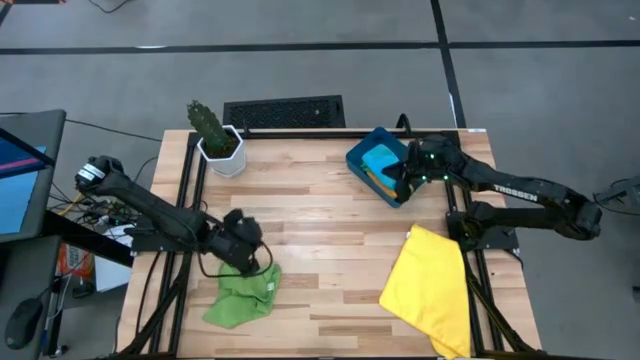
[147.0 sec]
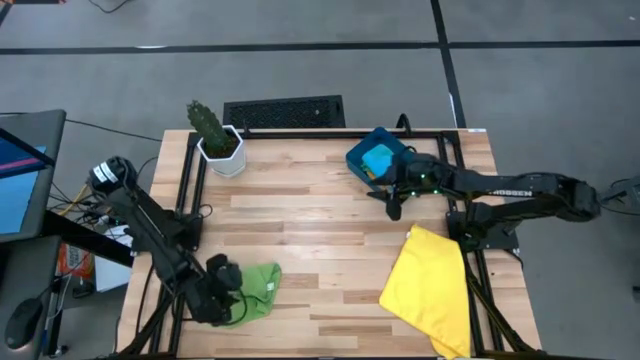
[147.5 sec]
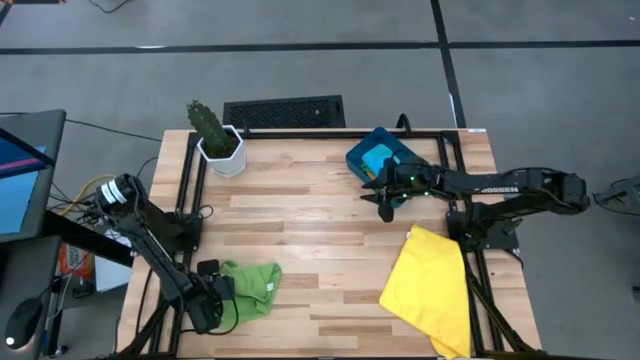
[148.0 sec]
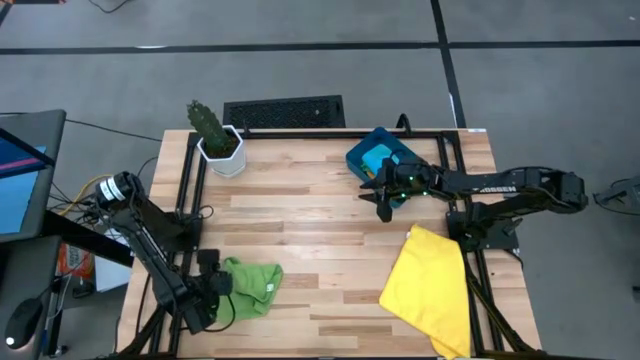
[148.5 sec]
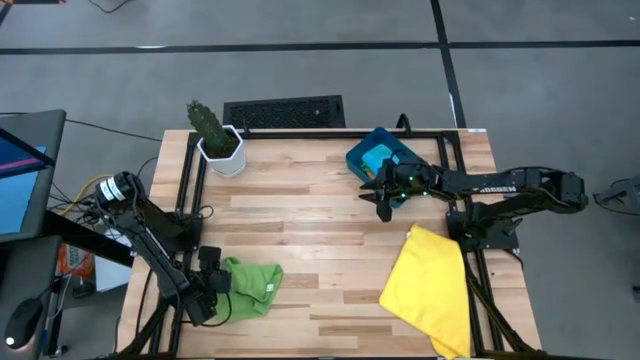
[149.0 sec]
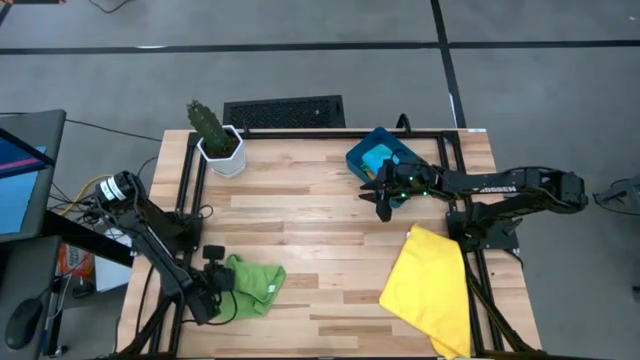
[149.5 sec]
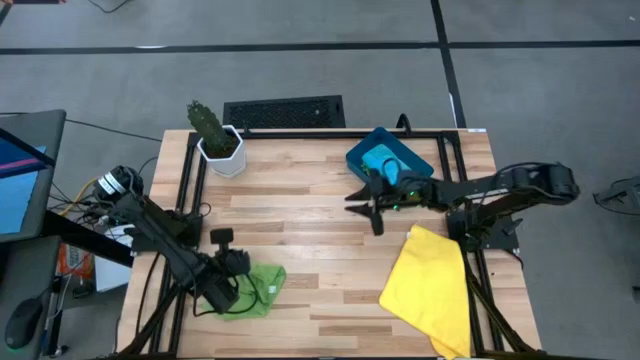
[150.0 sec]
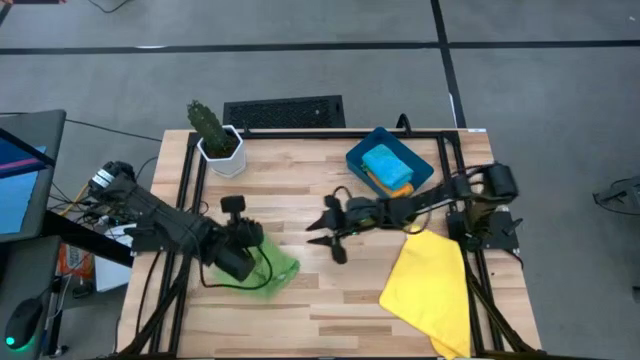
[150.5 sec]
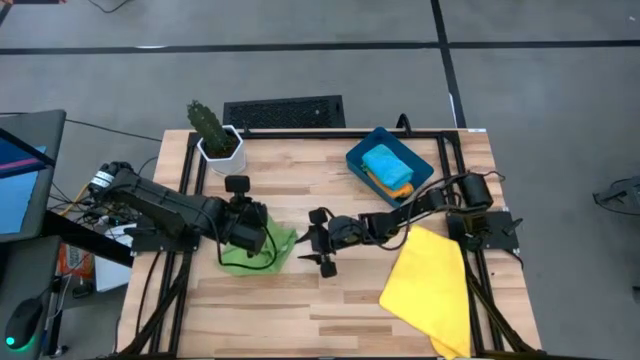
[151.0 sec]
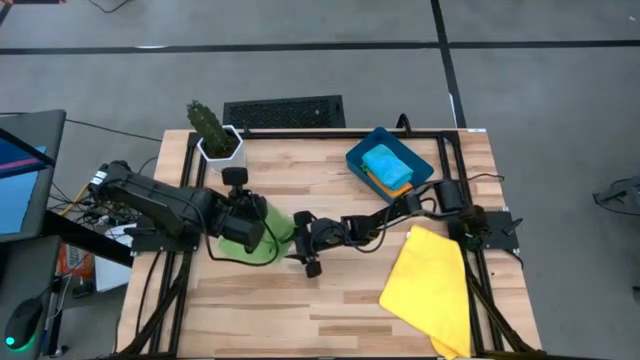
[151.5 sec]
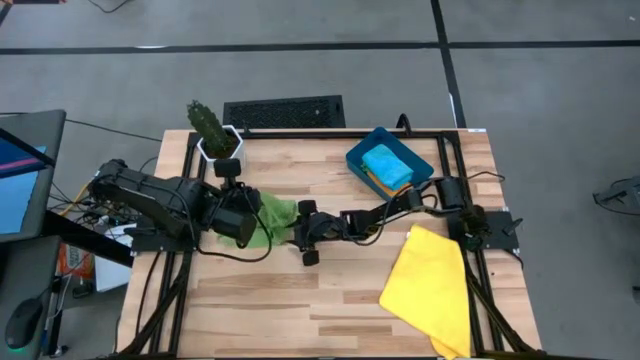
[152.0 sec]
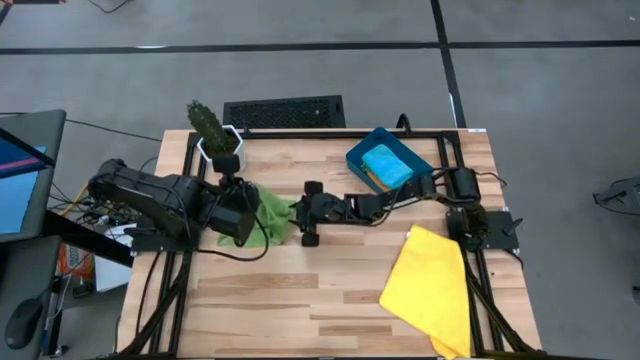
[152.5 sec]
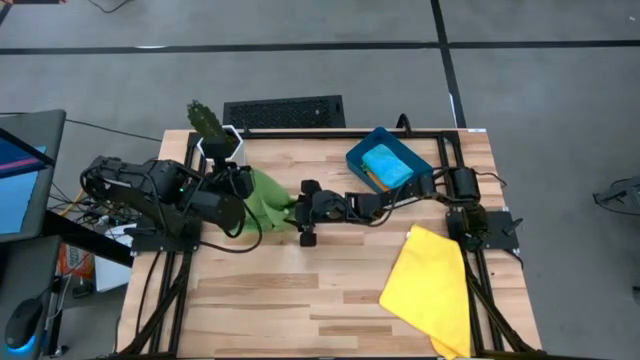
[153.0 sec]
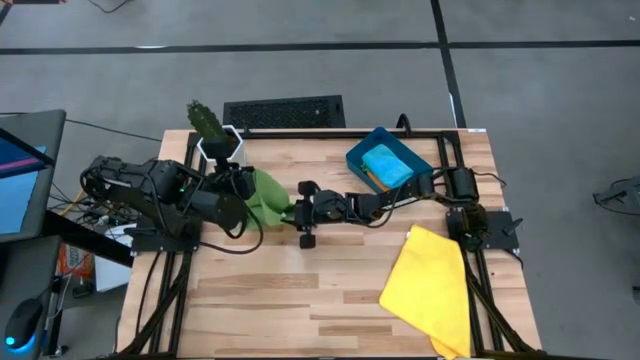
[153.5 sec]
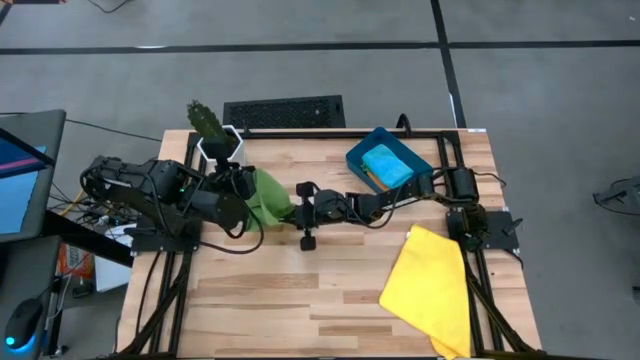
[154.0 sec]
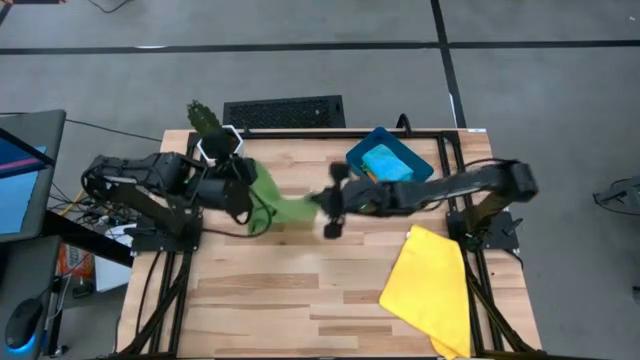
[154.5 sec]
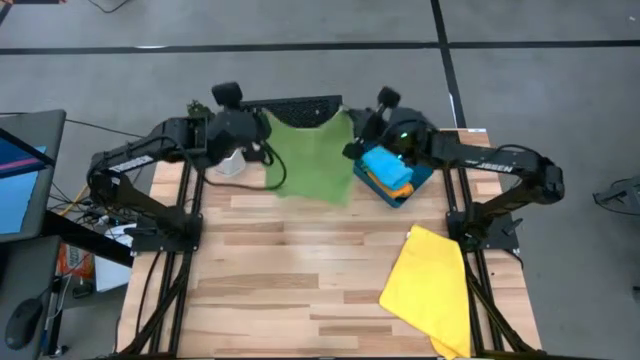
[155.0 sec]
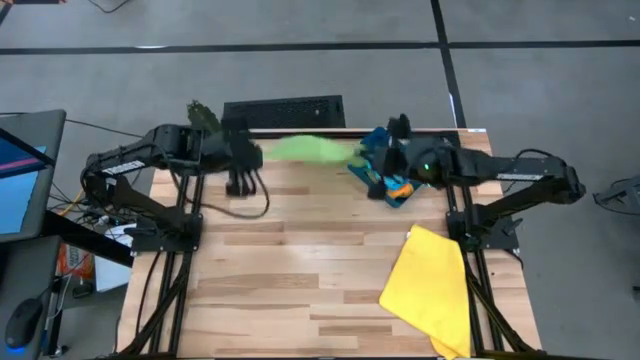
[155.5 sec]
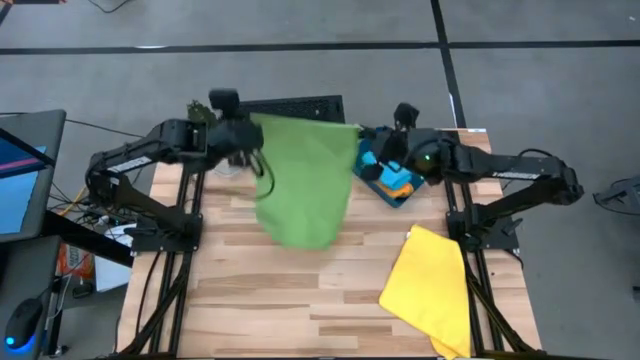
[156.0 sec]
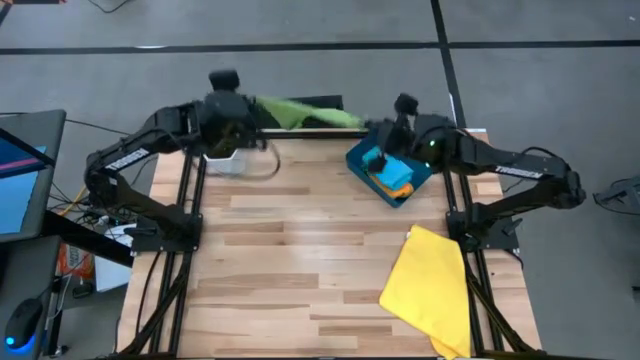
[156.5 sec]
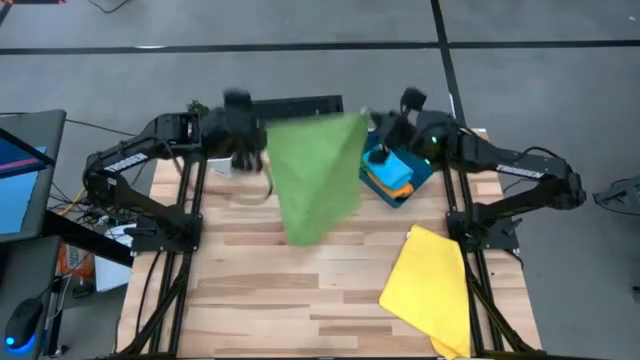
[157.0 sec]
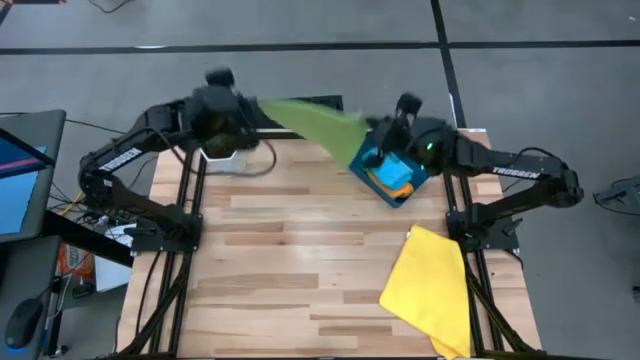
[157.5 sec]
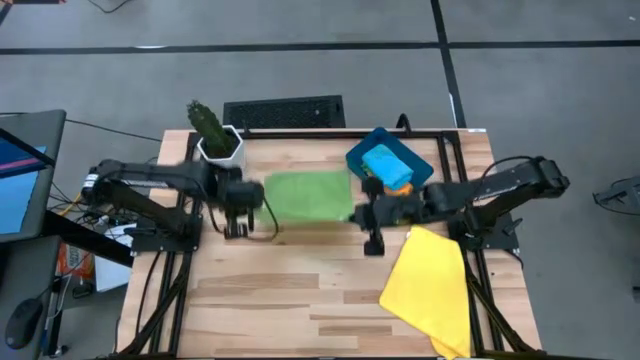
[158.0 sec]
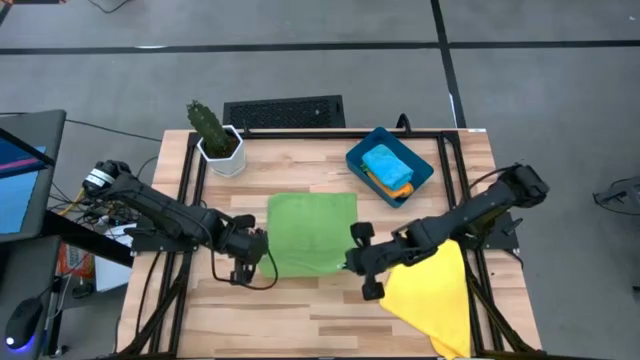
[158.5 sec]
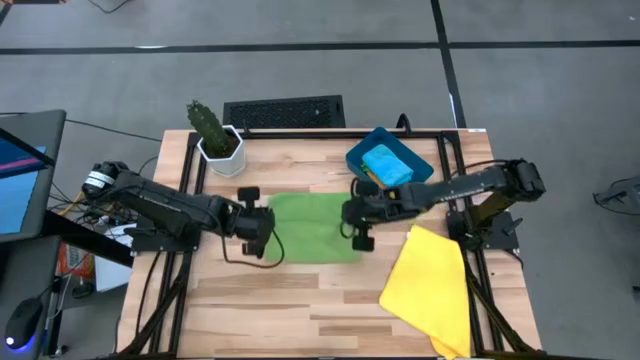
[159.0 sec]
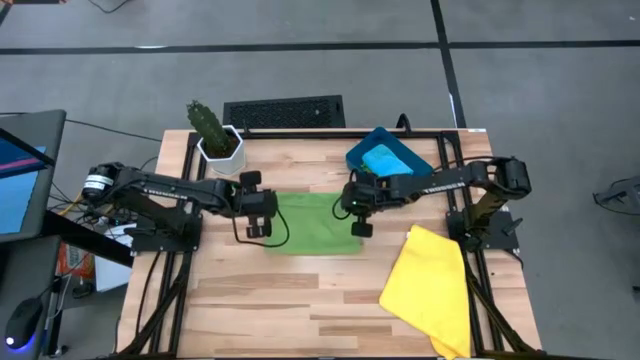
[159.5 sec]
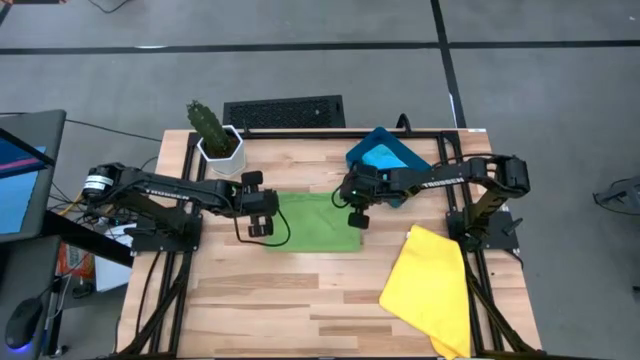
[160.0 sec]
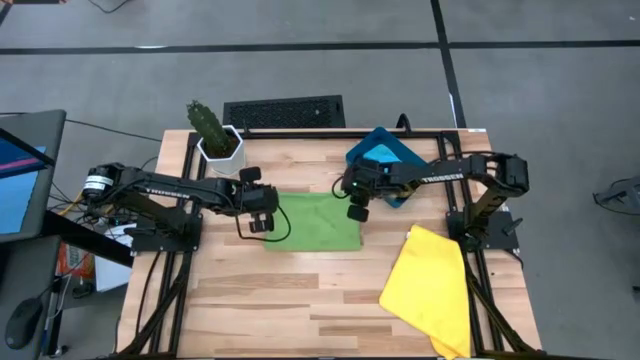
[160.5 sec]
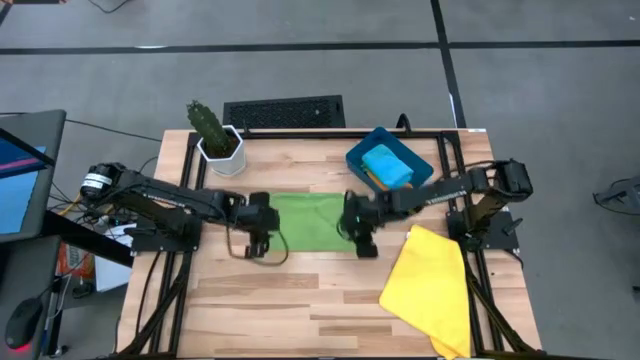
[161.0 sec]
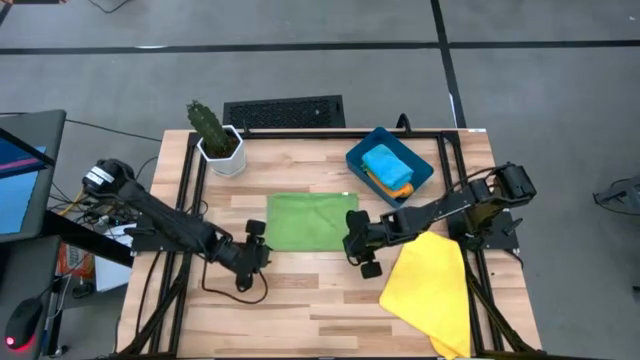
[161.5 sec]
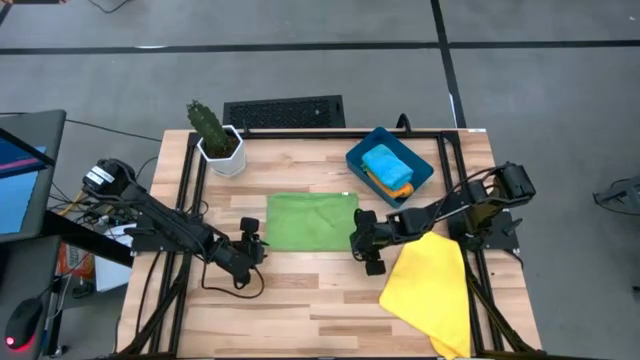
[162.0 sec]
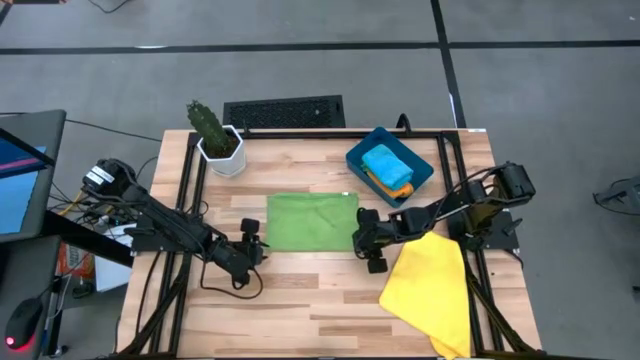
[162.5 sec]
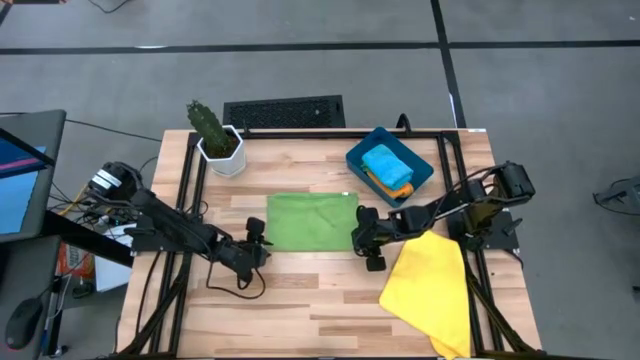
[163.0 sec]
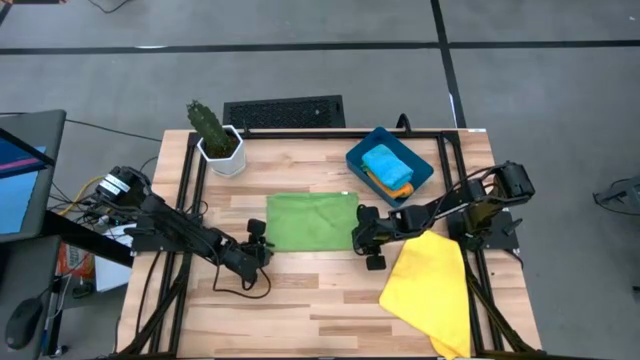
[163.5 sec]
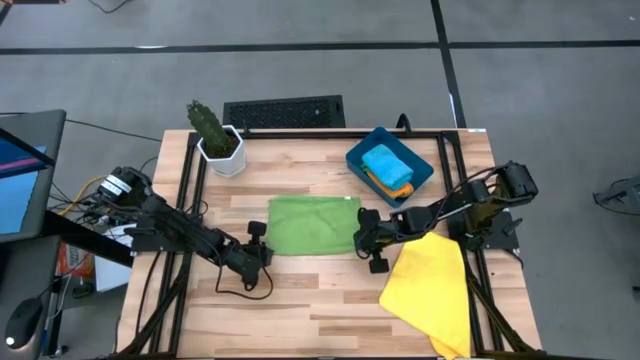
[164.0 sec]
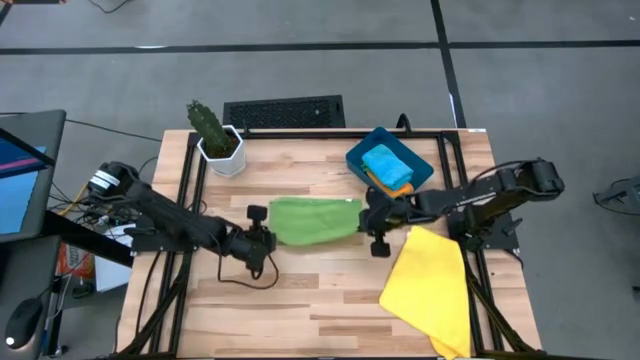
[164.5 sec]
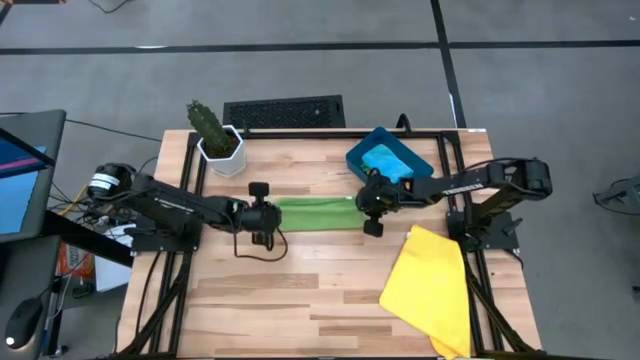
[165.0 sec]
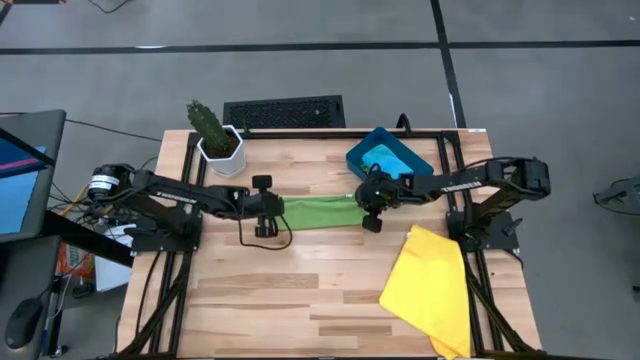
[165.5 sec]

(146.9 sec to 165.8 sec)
Task: Fold microfiber towels
Fold the green microfiber towel

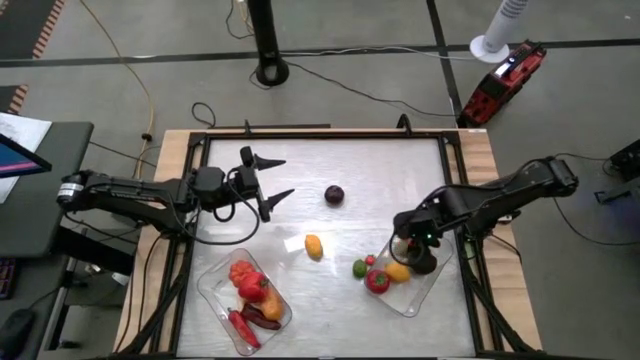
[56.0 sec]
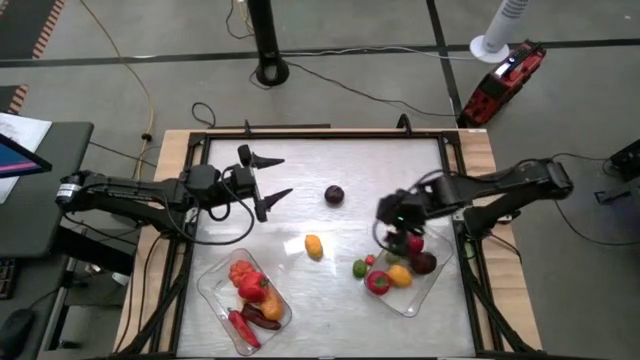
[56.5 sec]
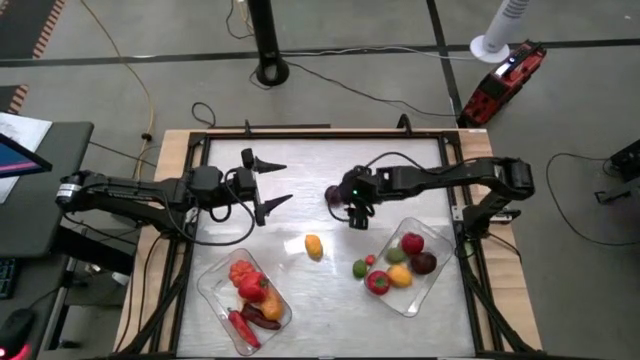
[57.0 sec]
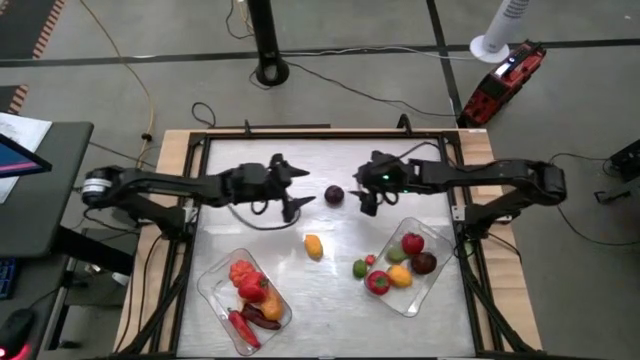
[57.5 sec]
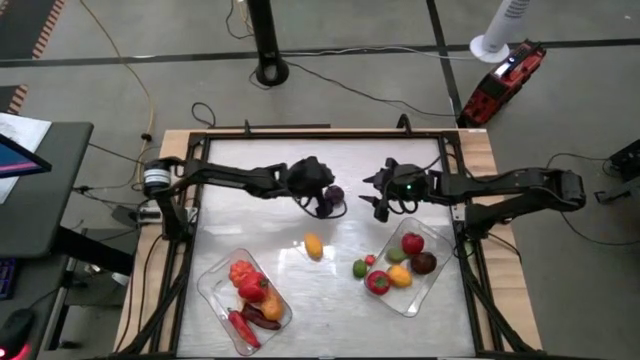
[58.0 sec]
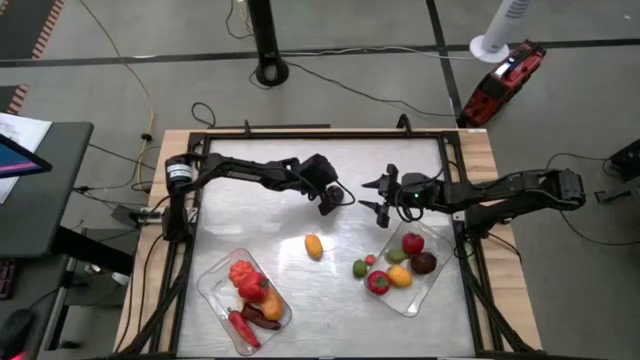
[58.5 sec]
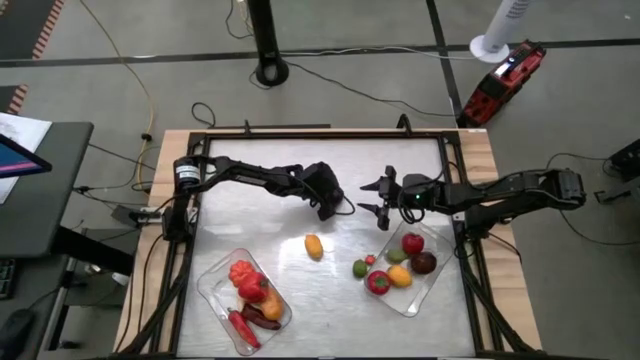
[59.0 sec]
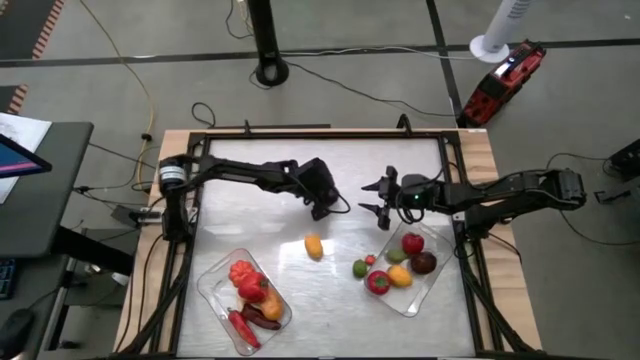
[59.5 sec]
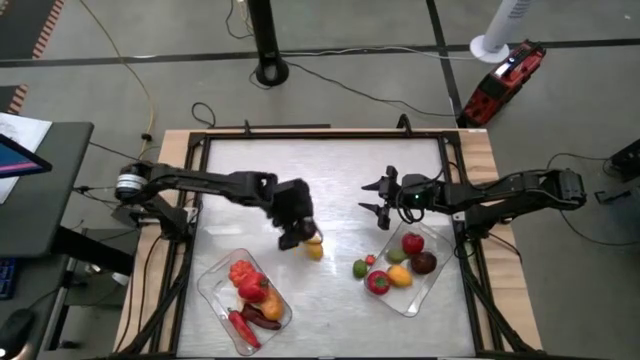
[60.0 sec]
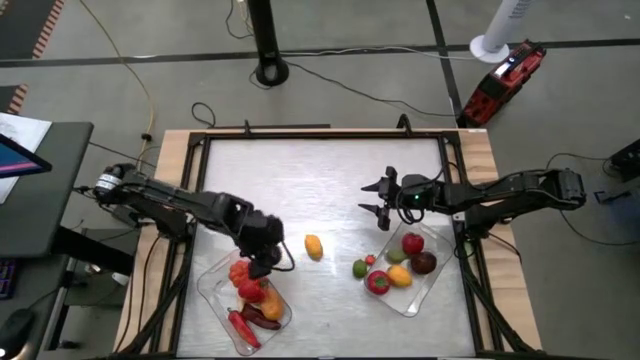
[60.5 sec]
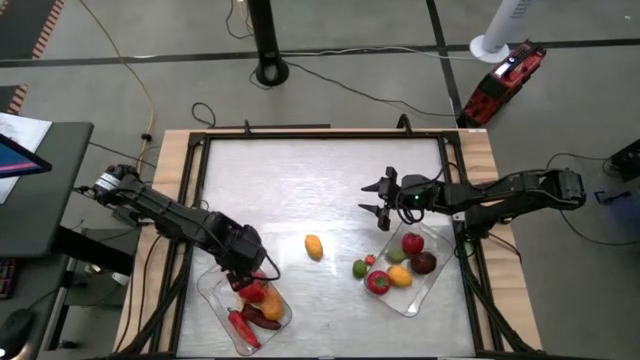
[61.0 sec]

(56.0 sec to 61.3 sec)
Task: Sort produce into baskets
Put the passion fruit into the left transparent bin
